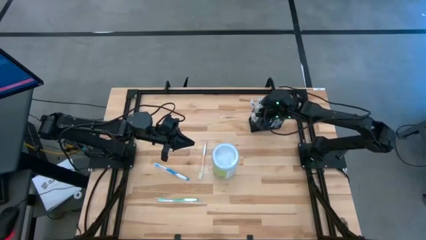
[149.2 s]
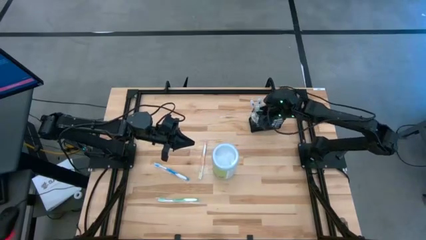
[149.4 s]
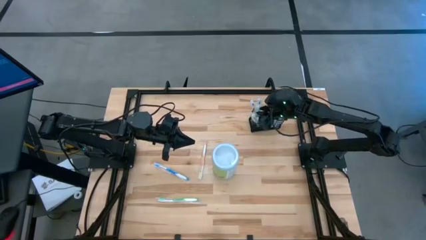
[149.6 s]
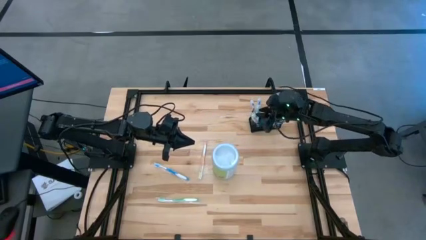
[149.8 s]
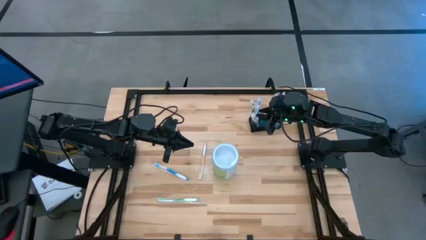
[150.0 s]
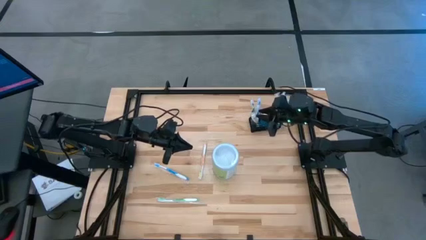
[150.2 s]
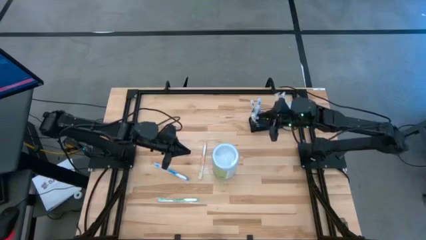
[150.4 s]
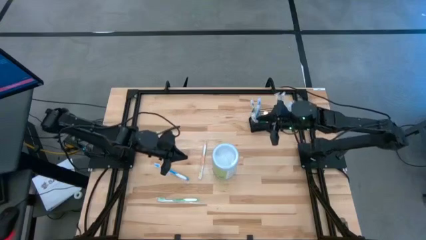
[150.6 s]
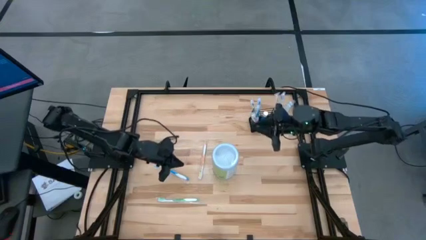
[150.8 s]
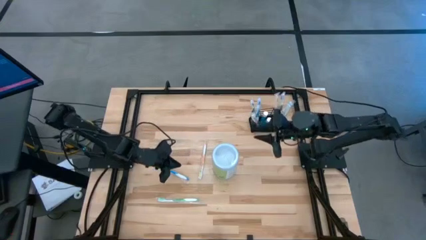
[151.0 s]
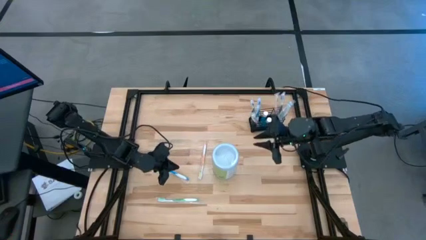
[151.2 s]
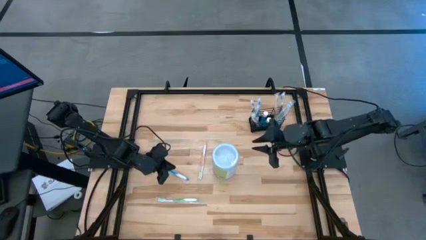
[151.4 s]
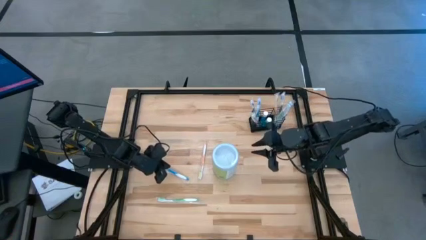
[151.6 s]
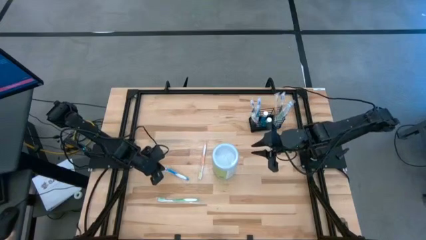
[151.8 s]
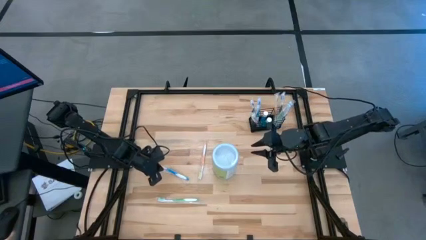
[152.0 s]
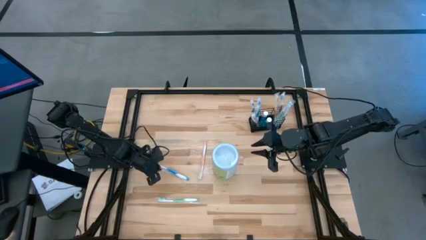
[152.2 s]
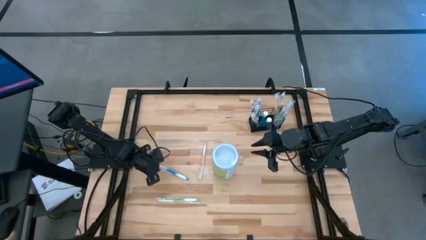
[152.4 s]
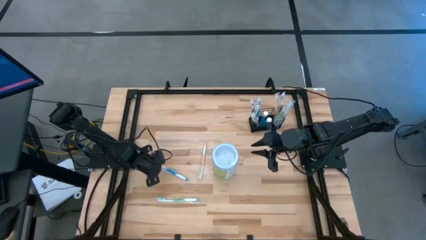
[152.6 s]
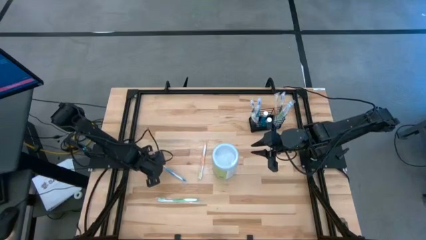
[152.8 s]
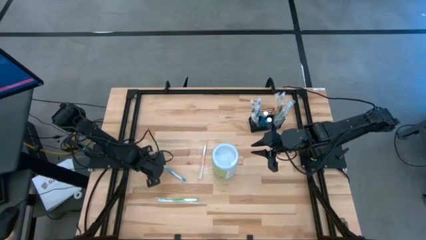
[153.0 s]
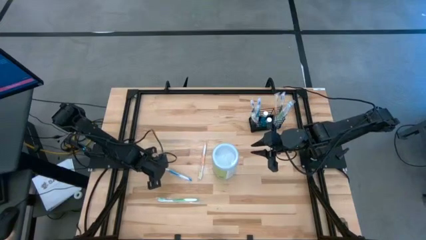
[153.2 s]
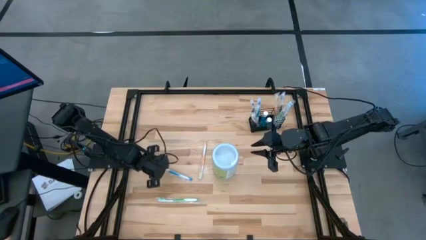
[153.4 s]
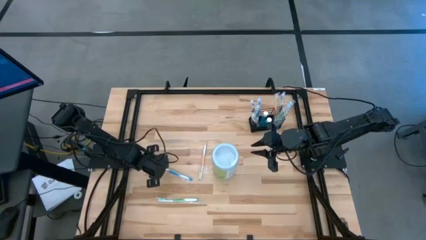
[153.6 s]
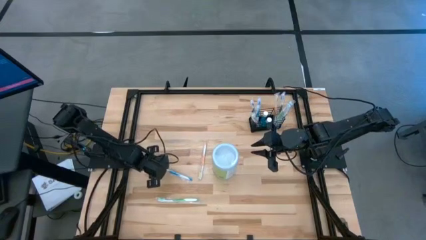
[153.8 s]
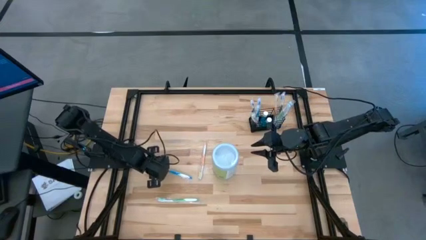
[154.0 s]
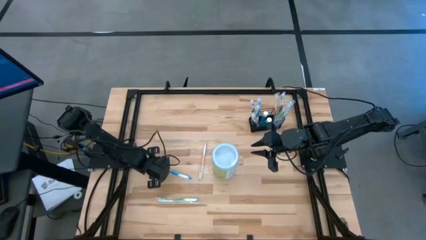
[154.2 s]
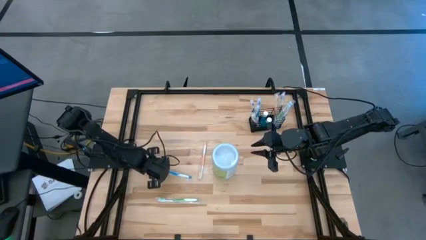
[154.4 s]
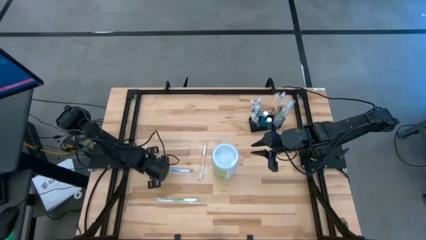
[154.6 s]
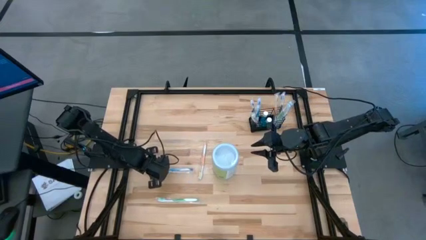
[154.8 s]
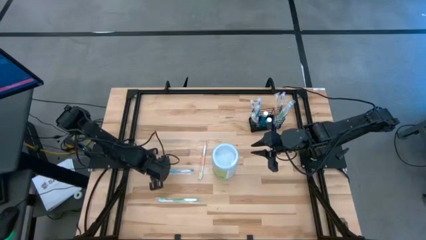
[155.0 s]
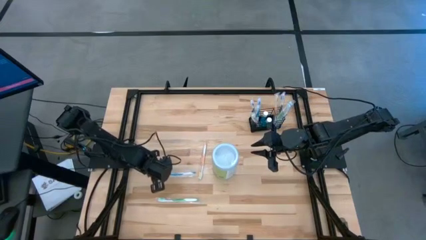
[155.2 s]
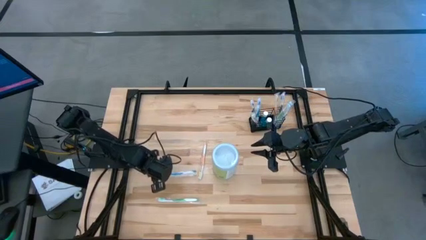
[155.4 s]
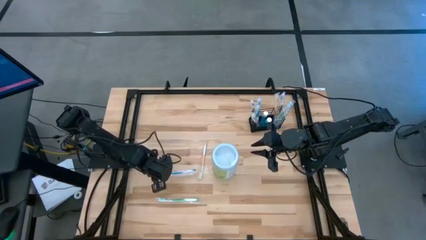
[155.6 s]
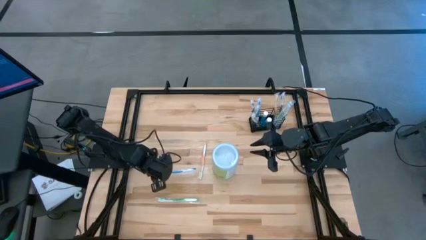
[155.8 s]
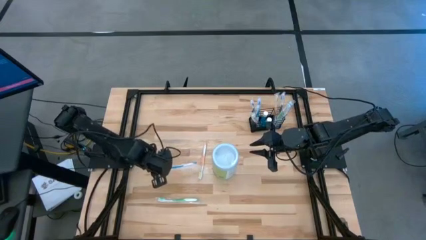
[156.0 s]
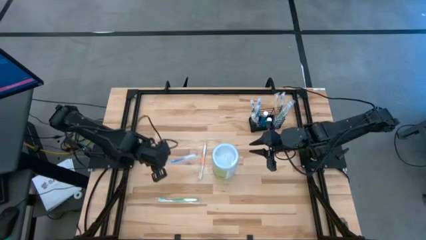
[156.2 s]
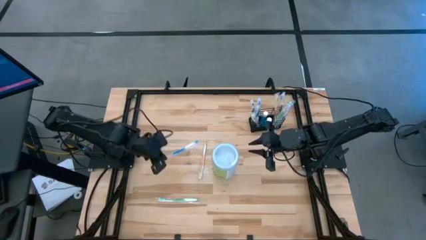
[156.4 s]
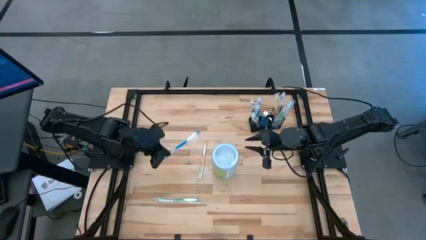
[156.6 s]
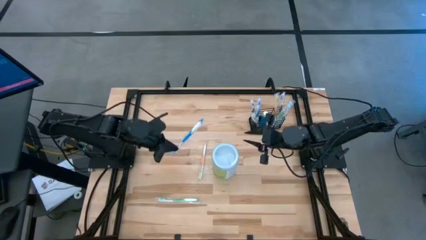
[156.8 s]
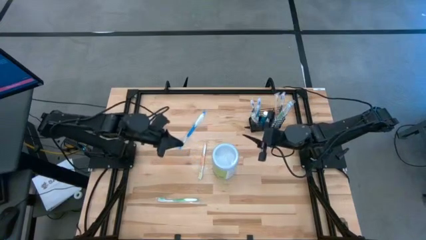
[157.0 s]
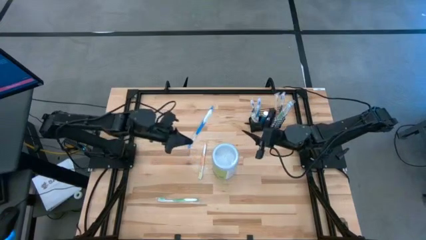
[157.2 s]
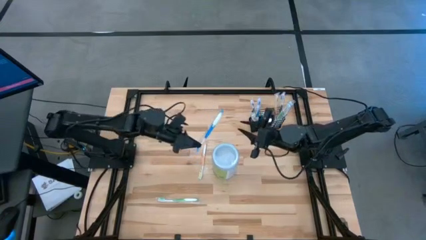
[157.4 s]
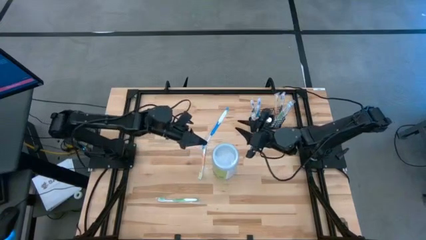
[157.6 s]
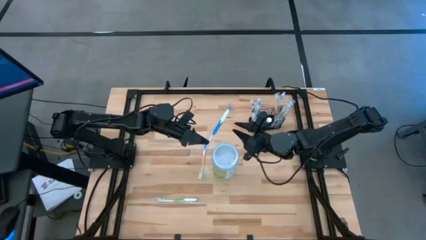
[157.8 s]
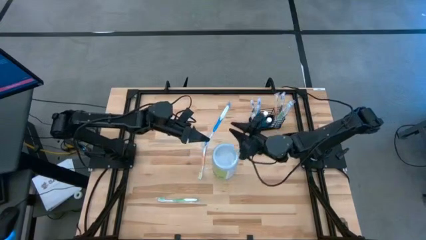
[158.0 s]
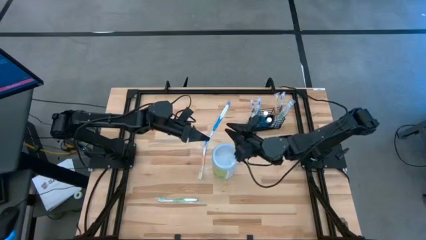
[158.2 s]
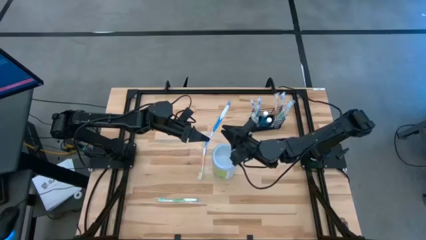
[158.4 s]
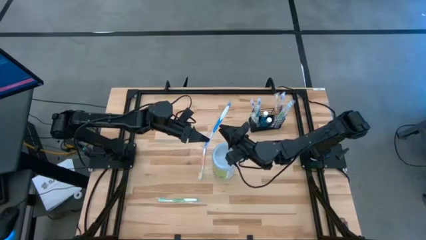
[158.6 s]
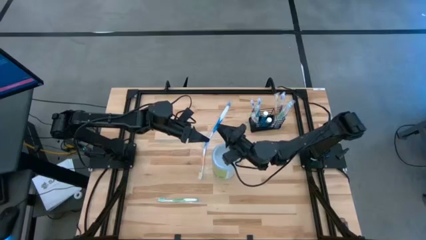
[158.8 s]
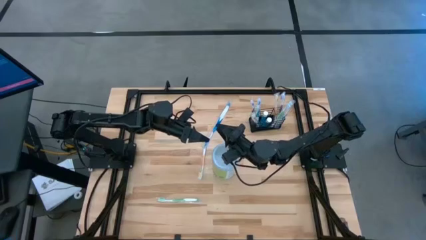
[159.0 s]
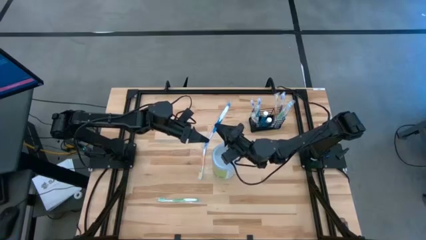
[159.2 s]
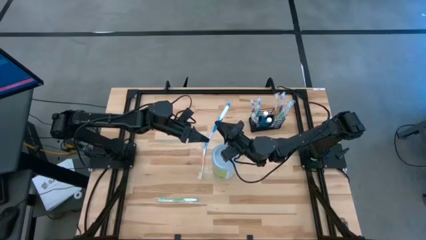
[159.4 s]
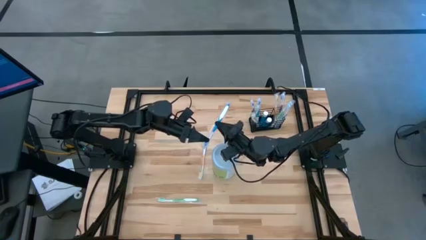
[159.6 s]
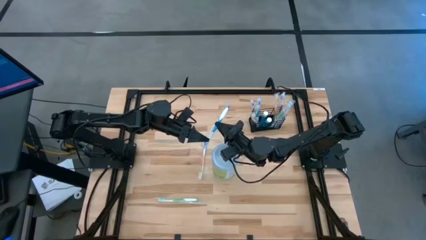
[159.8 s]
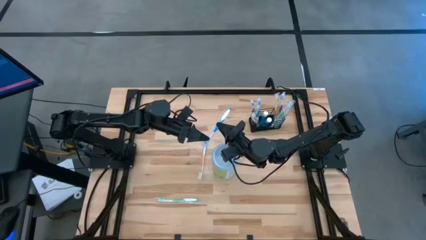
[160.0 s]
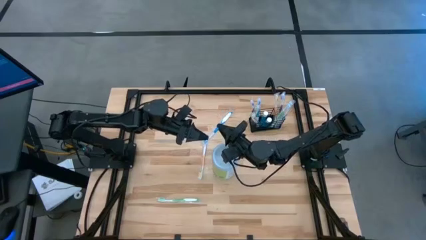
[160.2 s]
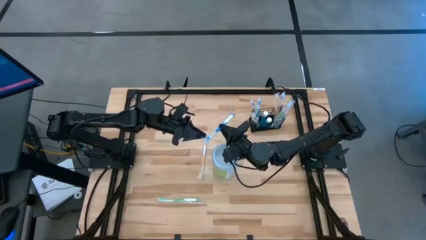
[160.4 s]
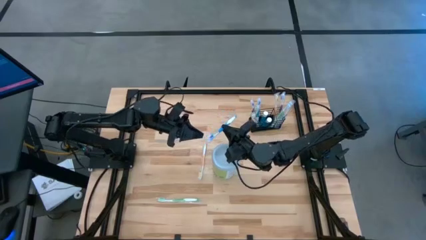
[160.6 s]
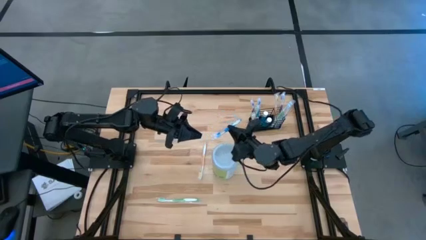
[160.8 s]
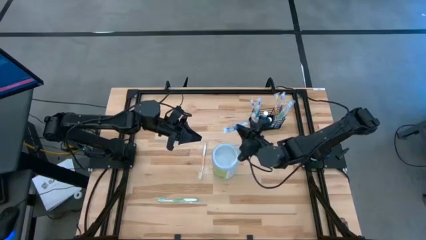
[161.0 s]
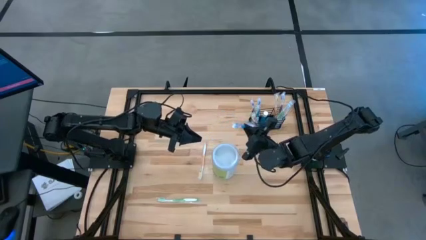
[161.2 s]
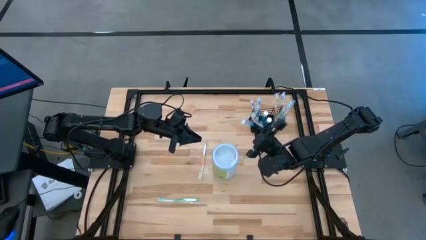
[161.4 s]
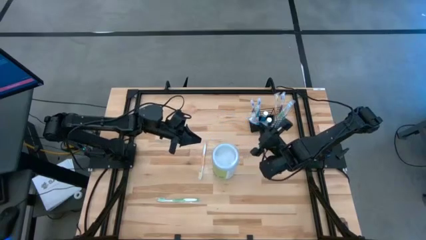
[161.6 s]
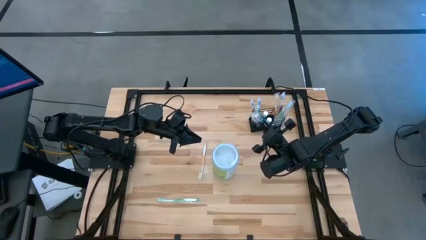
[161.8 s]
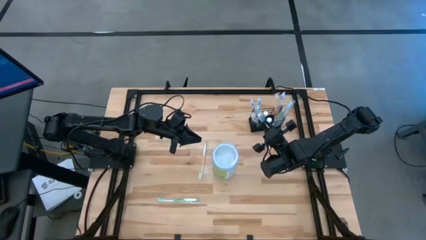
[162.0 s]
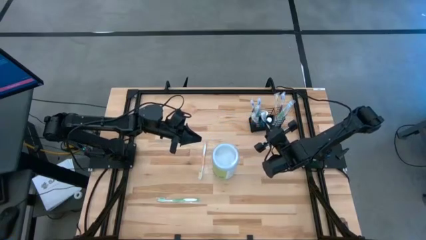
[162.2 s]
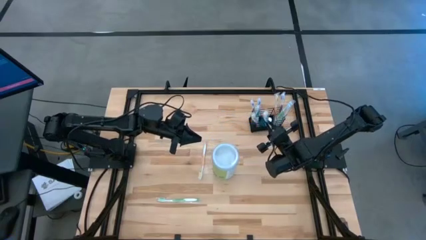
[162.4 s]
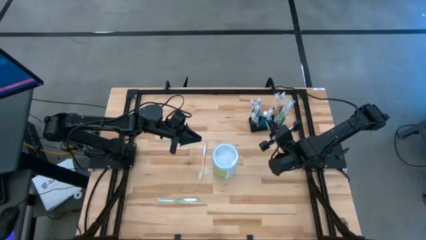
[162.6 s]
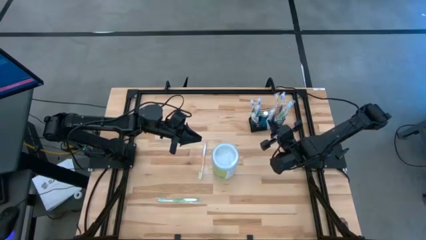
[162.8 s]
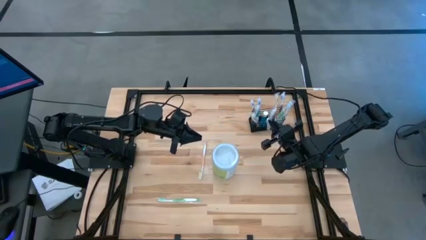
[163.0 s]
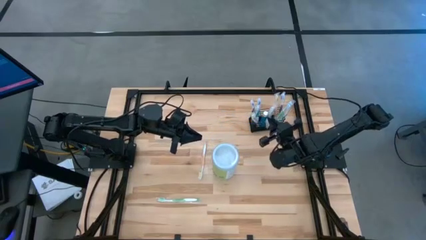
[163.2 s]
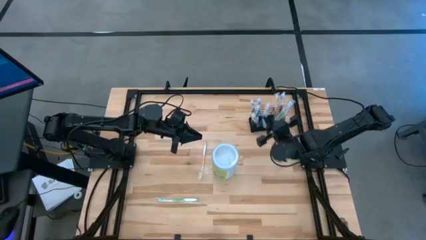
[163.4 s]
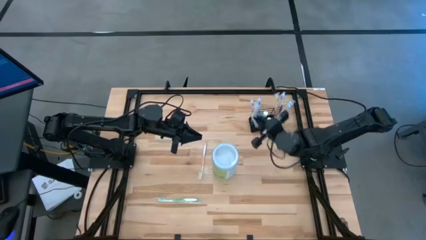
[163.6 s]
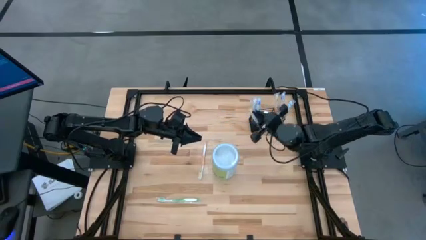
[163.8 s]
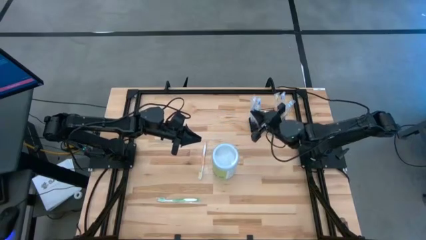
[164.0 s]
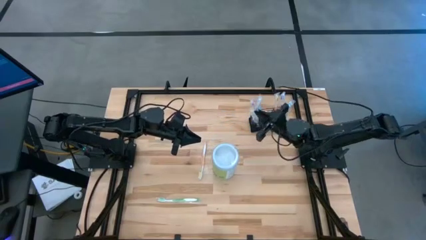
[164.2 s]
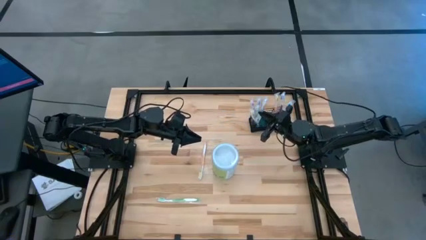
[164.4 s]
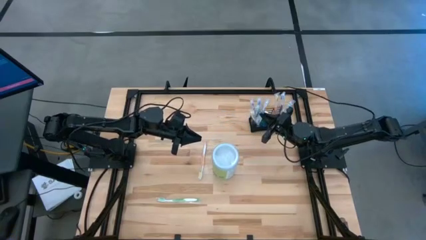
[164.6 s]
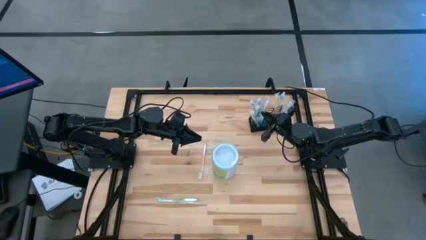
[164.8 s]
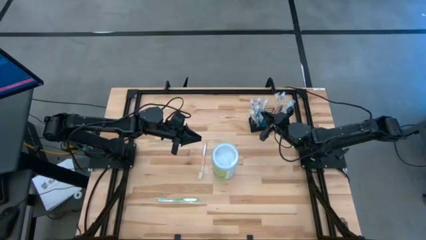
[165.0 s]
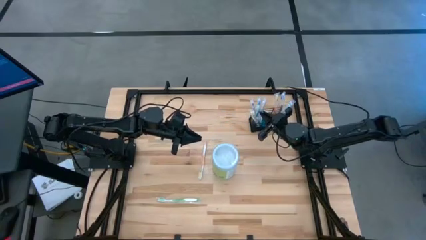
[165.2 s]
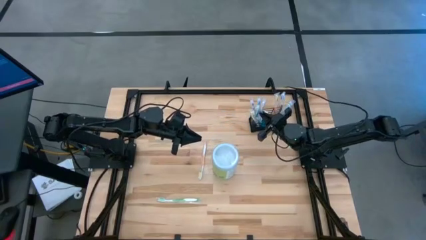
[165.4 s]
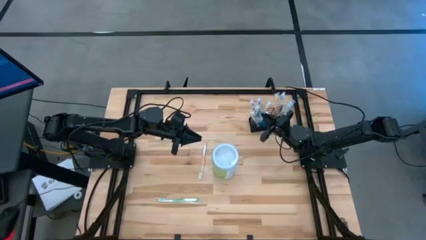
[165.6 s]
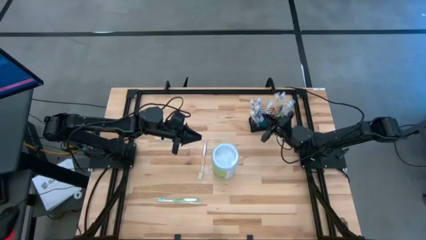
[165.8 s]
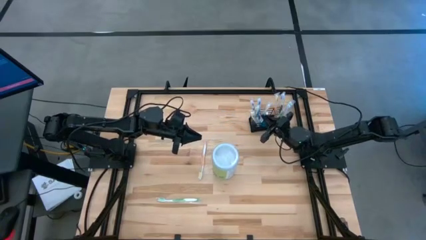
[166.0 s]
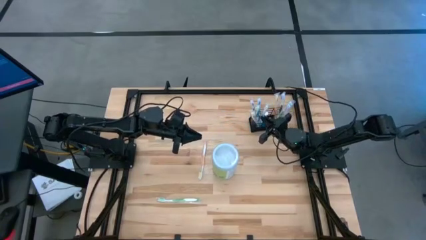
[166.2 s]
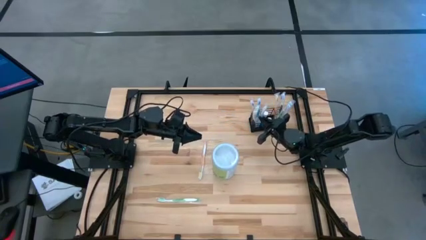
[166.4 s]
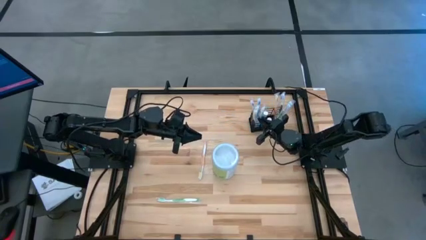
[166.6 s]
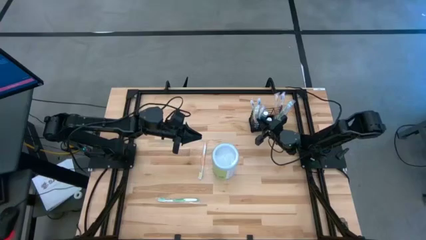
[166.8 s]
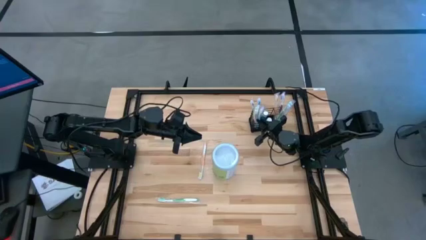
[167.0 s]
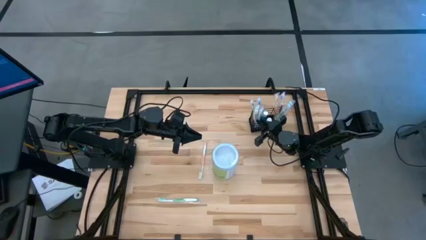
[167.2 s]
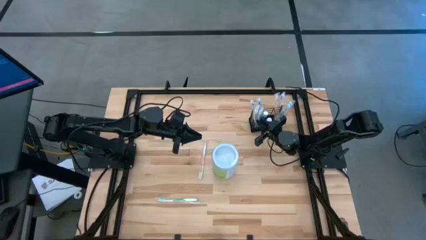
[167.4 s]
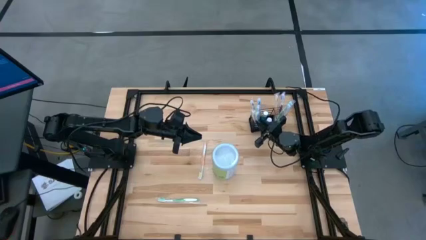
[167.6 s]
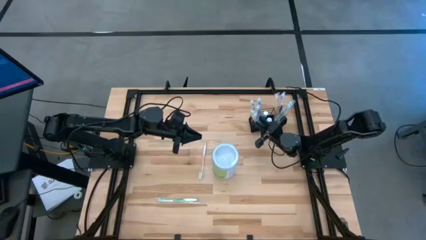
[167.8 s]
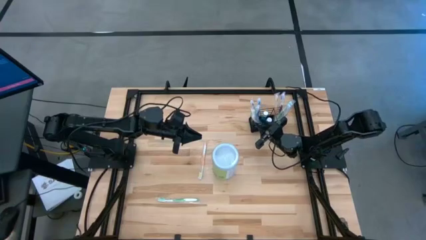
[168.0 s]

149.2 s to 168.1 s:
Task: Pick & Place toothbrushing station
Put the blue toothbrush into the wire organizer
